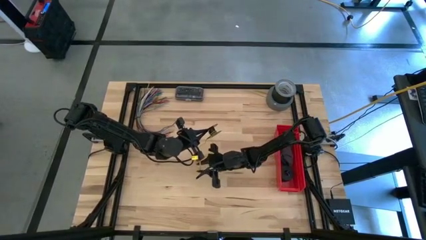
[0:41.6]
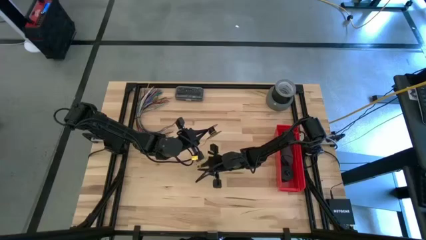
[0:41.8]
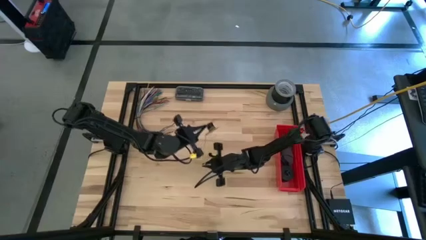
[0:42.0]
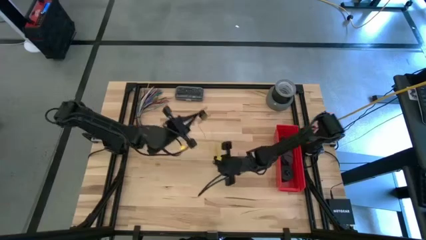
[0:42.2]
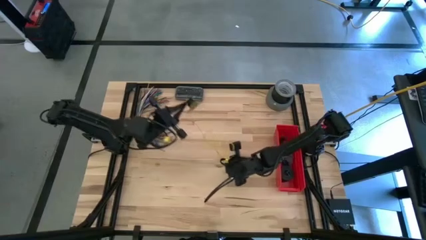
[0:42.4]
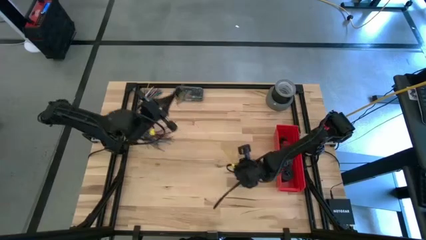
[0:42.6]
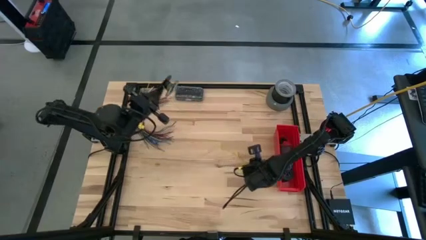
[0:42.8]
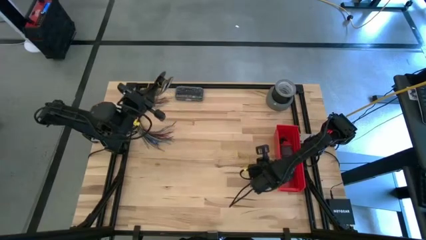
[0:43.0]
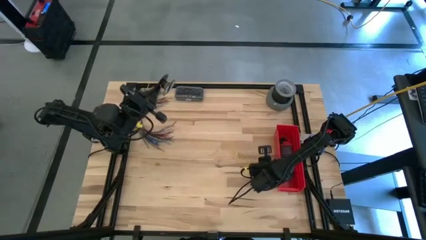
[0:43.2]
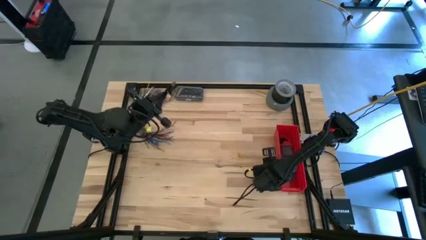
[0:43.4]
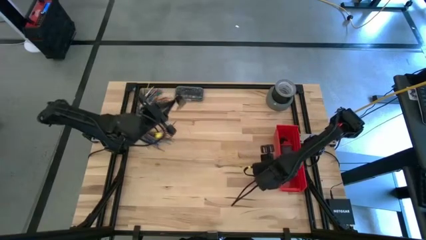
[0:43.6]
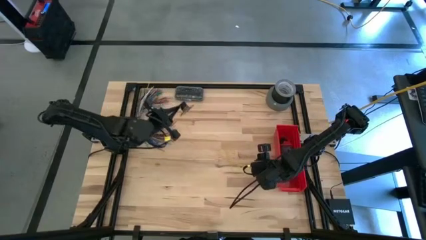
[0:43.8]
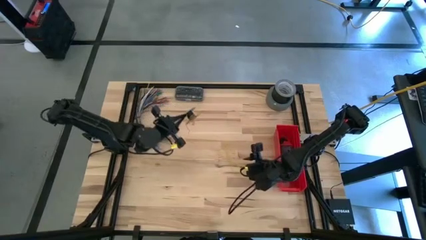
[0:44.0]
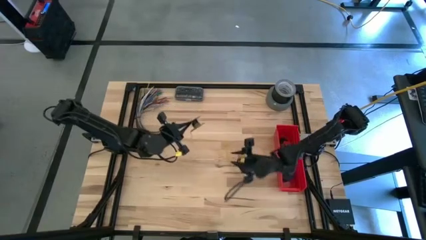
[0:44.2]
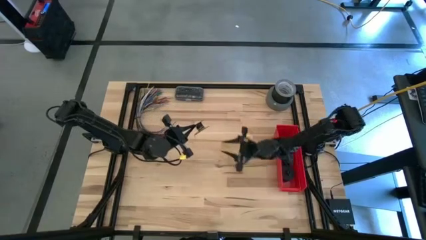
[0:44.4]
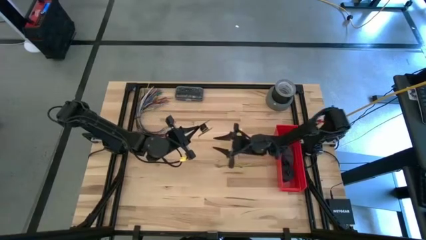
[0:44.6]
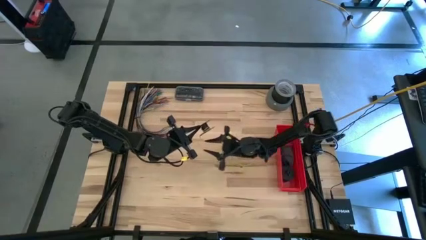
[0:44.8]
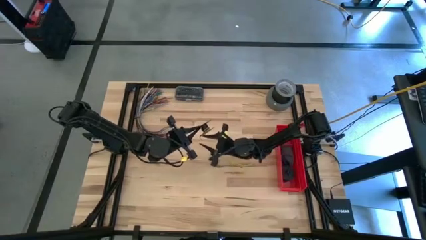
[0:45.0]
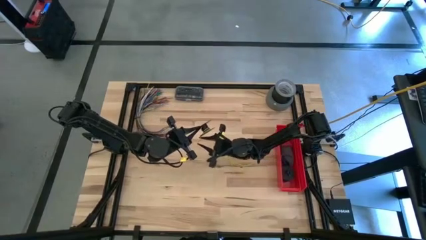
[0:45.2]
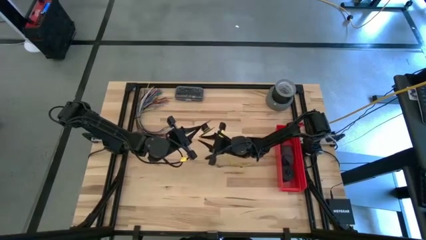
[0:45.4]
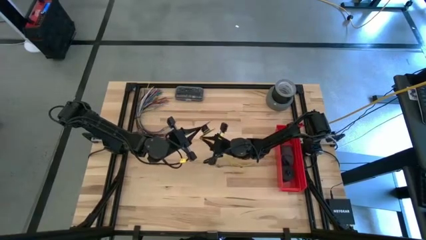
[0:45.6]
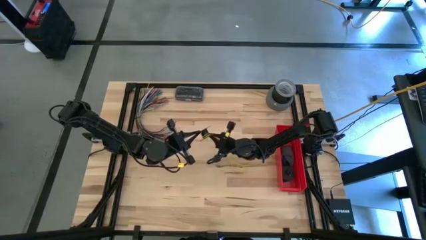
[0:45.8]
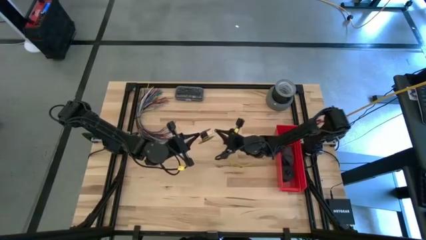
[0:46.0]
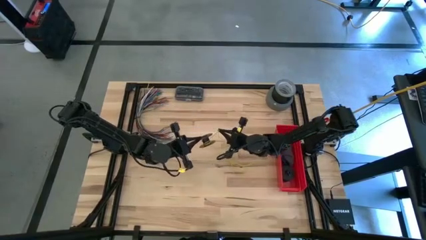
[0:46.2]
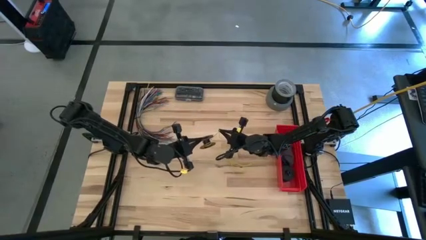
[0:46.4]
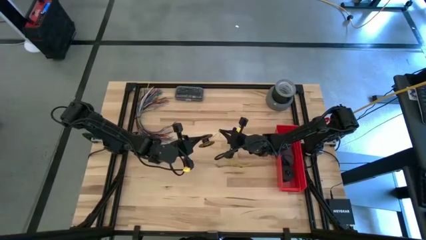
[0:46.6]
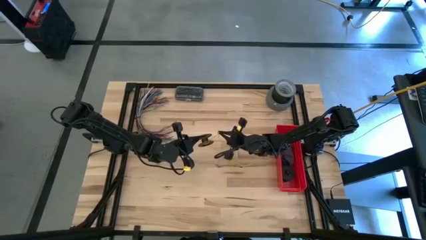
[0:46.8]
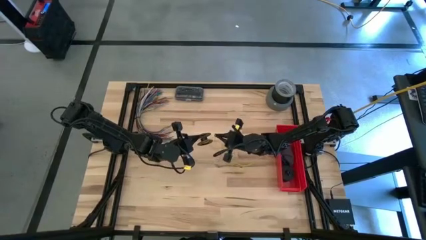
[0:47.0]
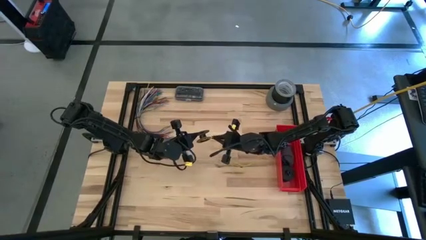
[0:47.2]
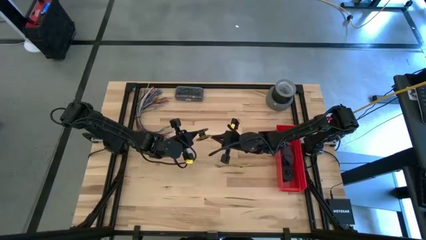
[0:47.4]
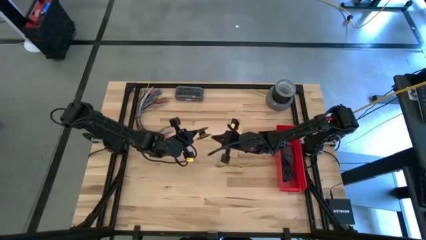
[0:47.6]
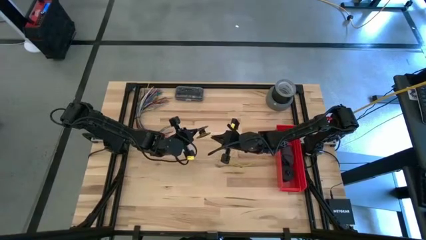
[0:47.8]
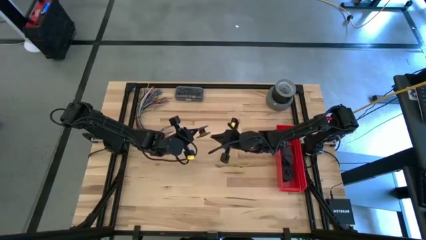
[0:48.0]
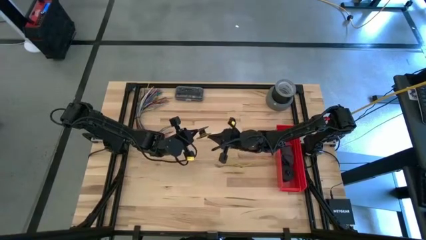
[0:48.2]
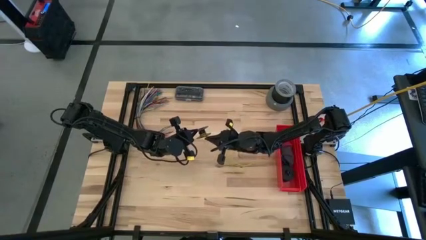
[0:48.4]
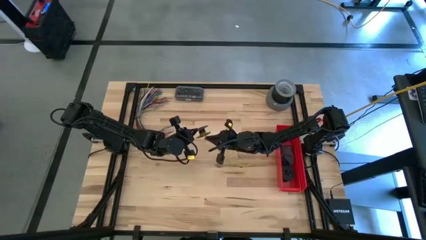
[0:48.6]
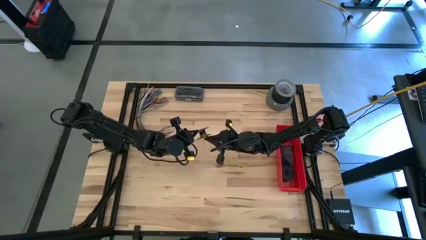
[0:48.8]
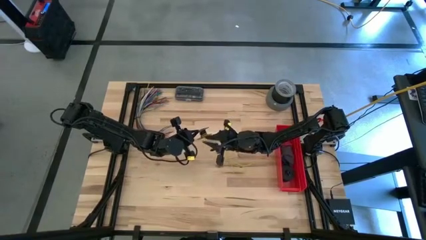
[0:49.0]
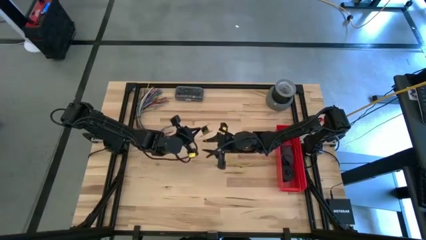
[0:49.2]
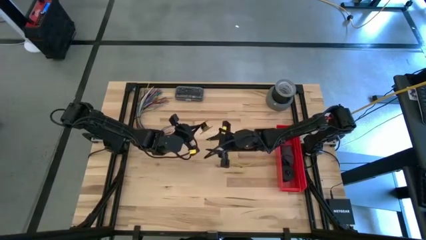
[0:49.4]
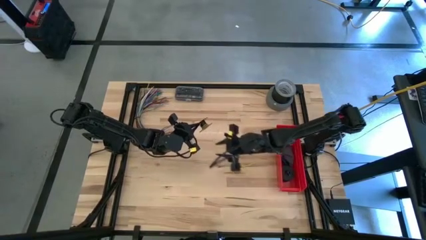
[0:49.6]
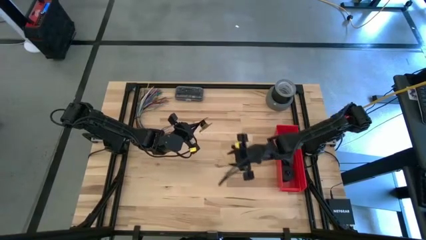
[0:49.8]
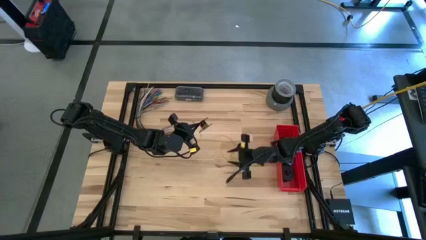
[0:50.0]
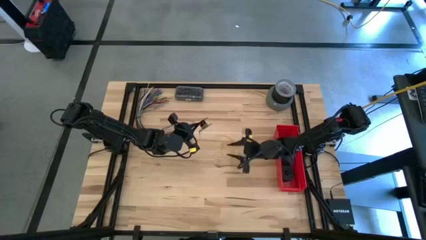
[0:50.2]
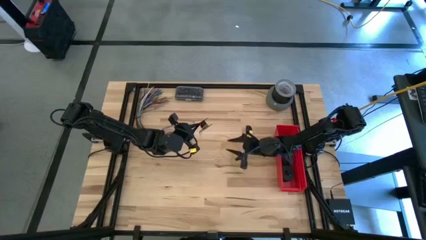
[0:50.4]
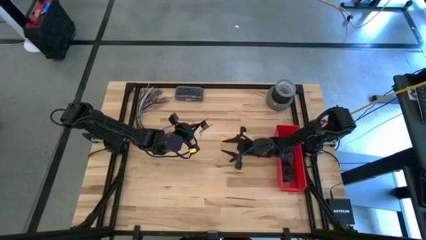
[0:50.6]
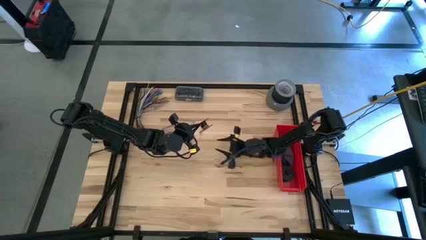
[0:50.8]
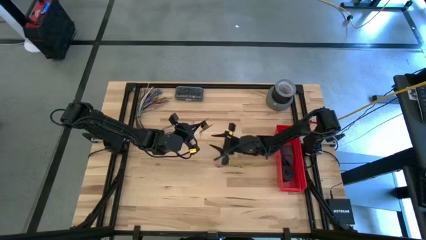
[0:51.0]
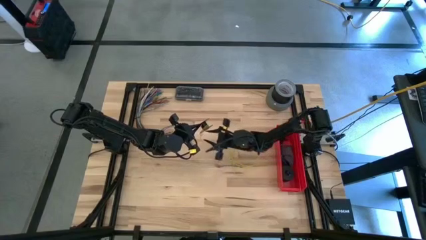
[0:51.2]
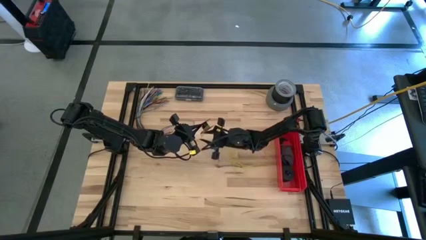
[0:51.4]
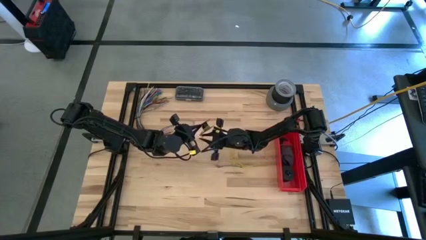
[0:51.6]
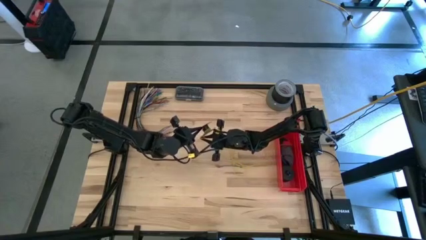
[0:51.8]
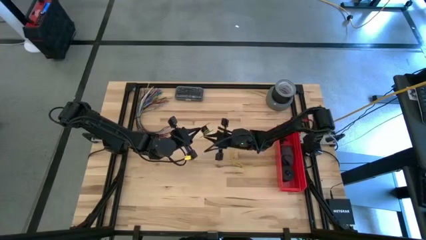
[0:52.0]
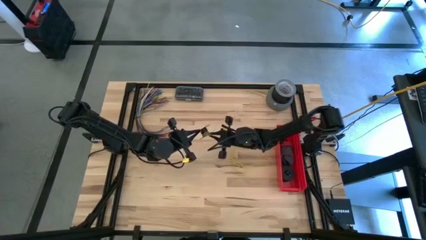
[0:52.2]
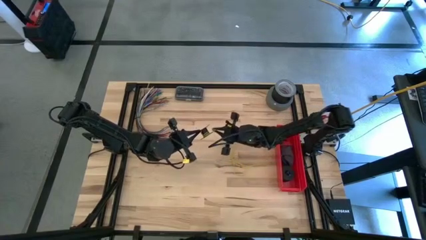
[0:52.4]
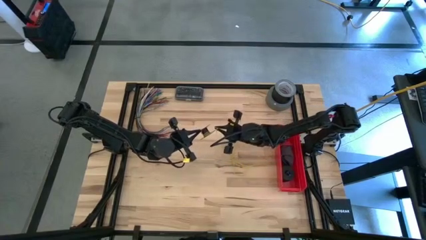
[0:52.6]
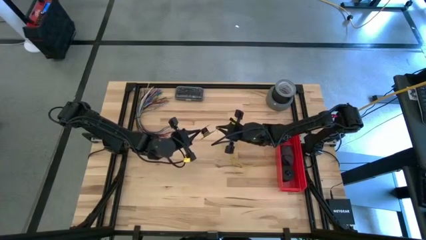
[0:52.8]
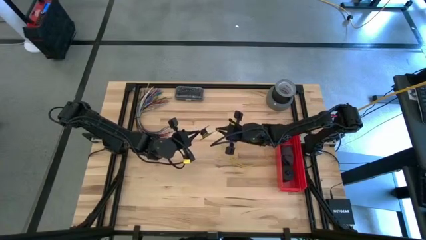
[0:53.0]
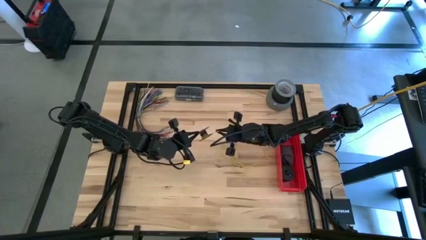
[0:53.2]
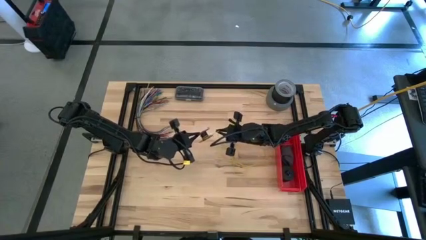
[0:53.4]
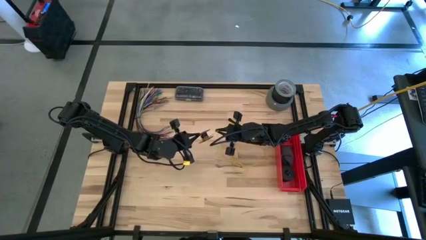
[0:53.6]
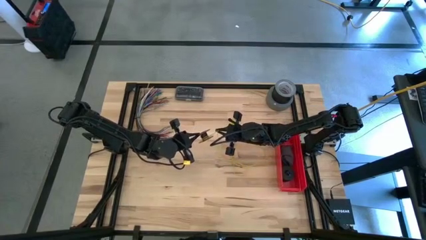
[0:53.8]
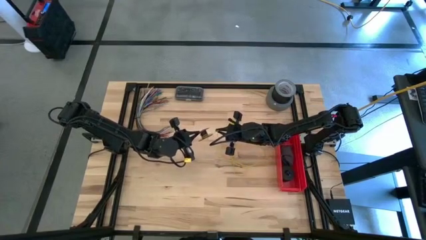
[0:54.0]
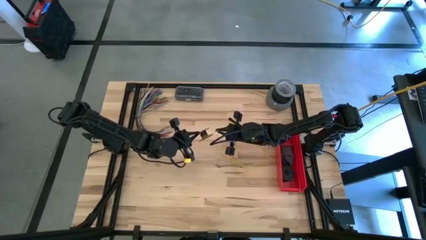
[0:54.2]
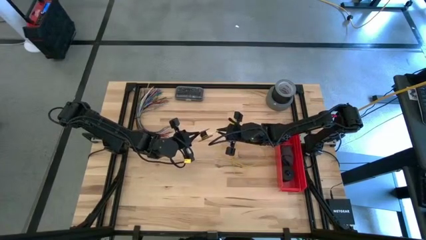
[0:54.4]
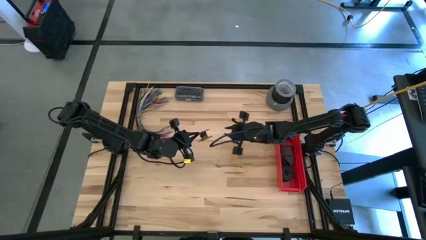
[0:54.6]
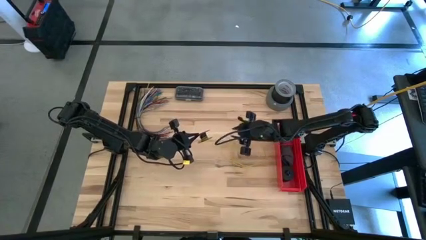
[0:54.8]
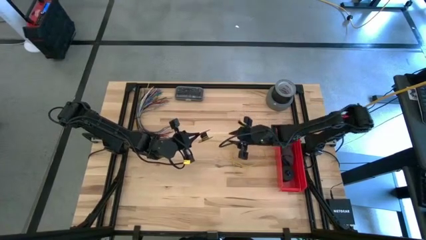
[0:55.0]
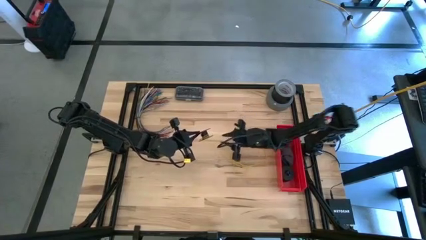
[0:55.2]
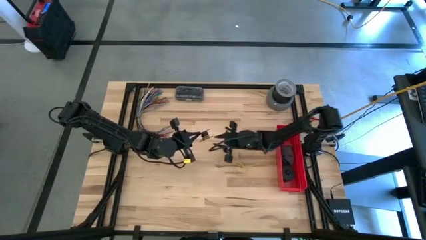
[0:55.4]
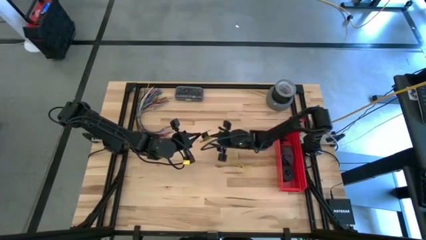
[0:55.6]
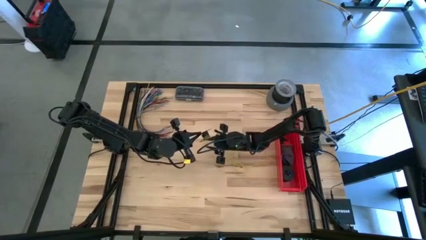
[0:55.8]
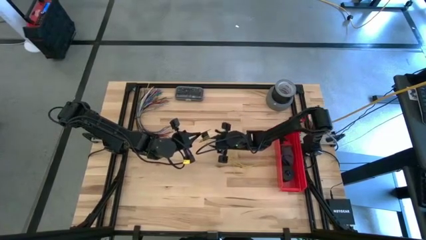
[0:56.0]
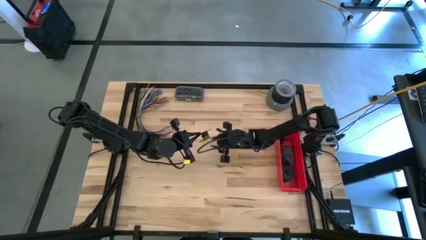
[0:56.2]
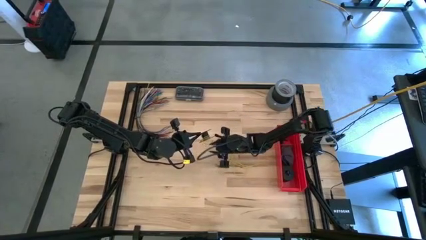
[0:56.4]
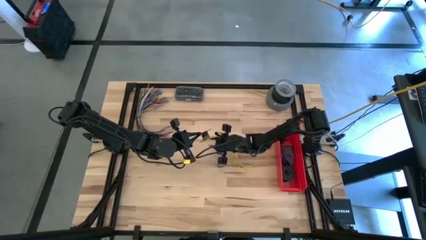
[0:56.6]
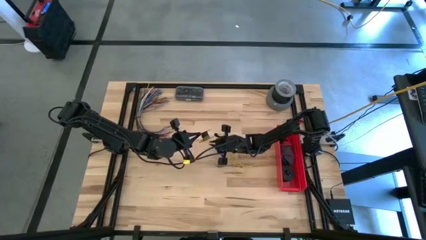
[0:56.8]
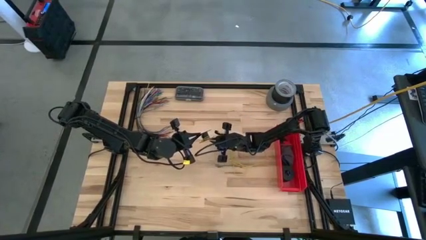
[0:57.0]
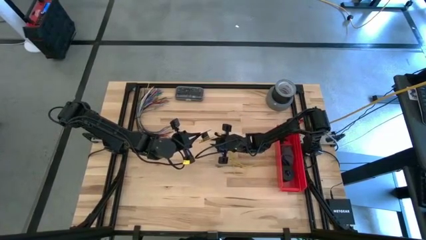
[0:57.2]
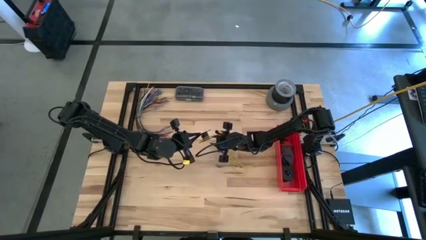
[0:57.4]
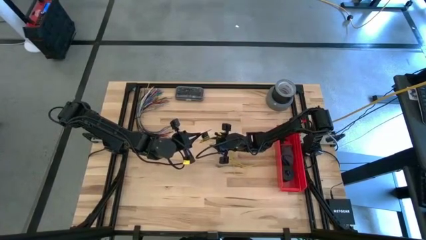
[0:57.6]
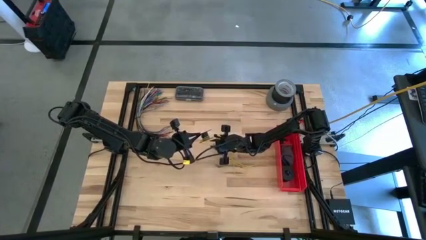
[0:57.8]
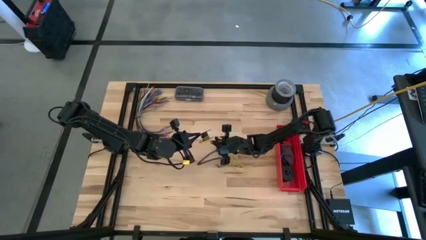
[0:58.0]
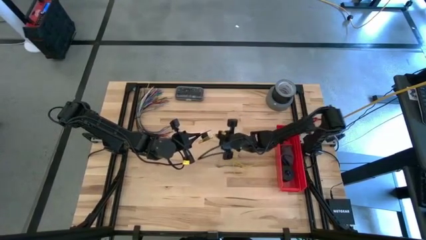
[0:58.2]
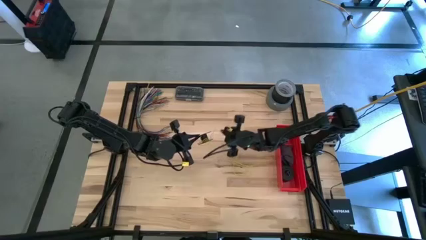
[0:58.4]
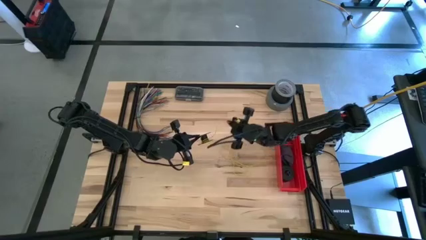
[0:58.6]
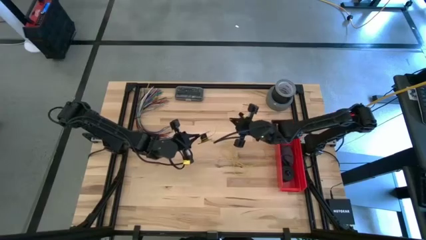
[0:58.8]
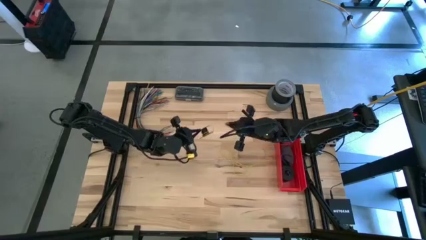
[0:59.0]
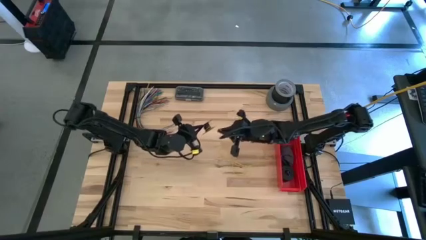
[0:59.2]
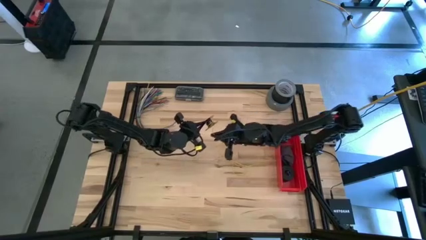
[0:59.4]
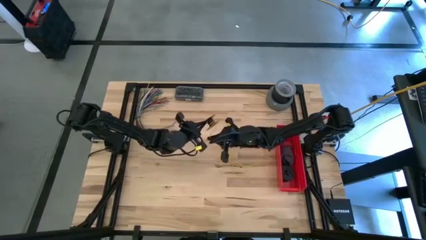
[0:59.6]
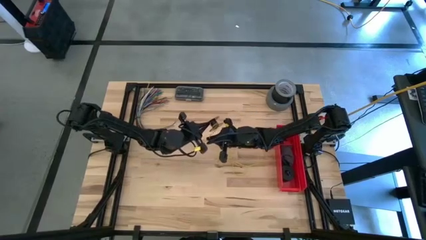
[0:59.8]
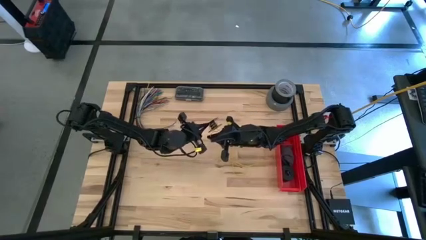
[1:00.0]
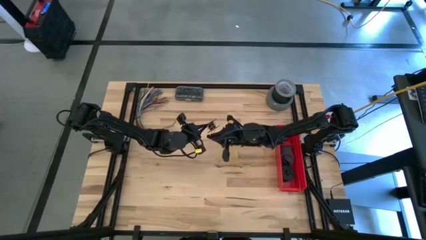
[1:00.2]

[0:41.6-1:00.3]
Task: Coil cords
Coil the yellow wire onto the black spool
